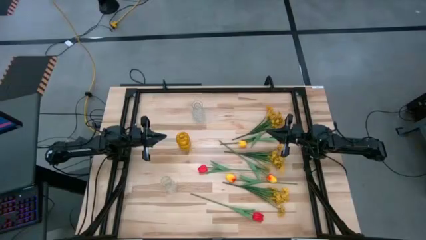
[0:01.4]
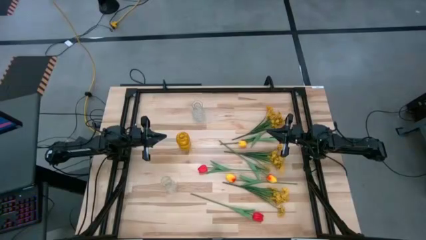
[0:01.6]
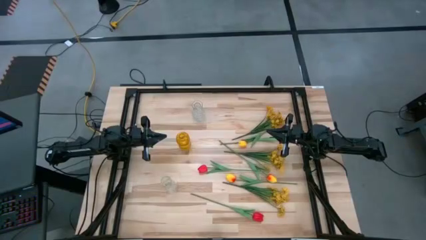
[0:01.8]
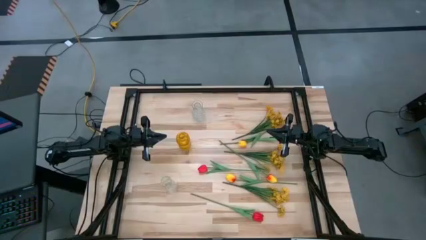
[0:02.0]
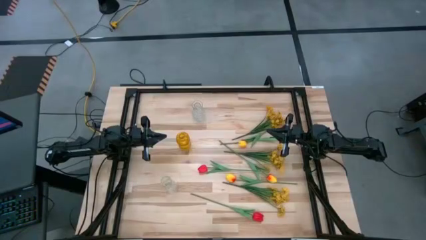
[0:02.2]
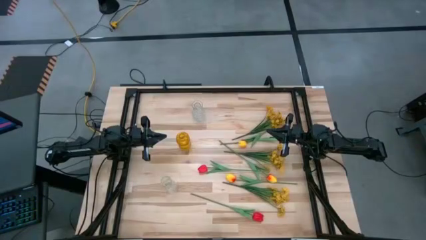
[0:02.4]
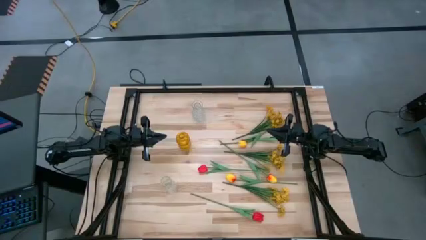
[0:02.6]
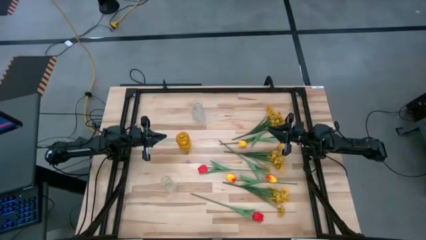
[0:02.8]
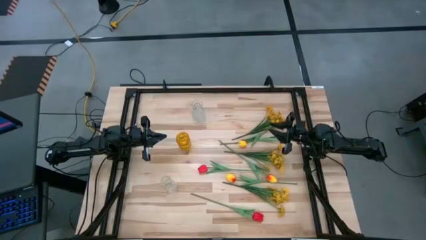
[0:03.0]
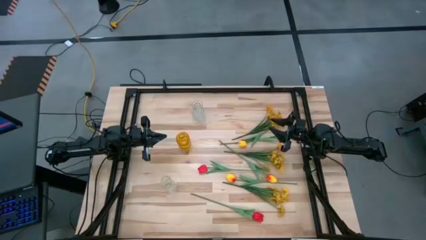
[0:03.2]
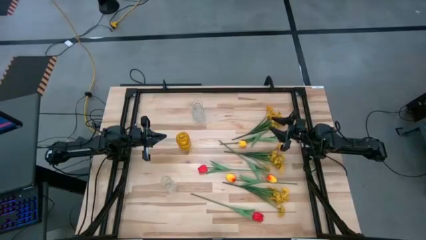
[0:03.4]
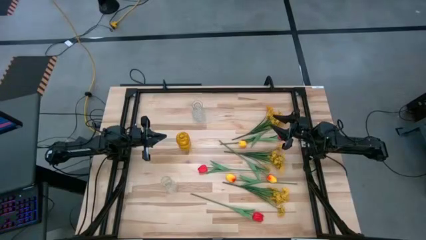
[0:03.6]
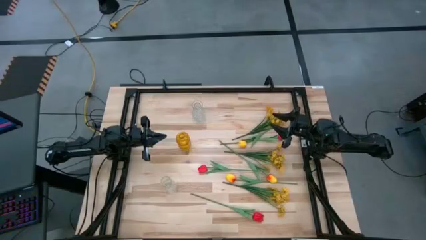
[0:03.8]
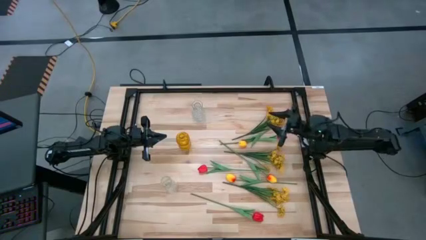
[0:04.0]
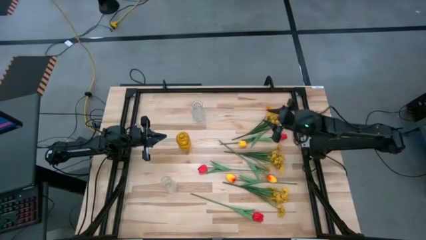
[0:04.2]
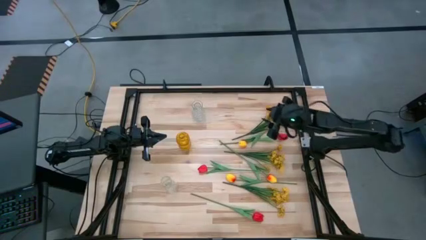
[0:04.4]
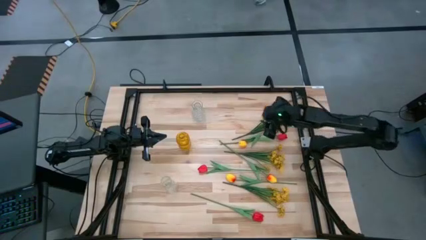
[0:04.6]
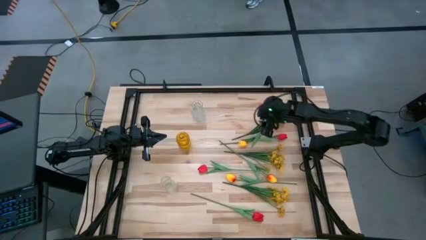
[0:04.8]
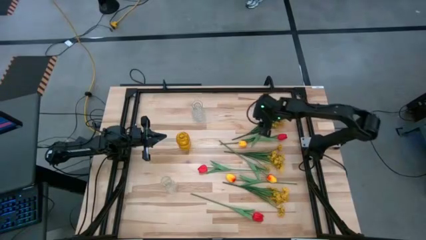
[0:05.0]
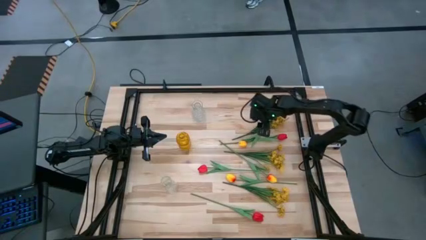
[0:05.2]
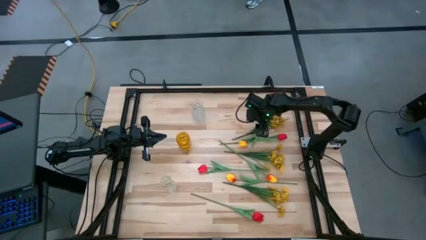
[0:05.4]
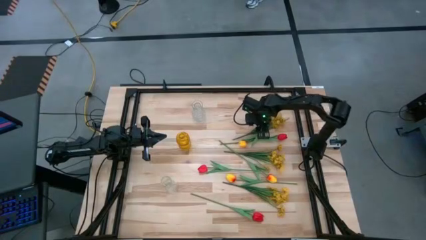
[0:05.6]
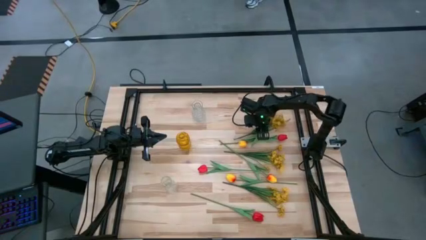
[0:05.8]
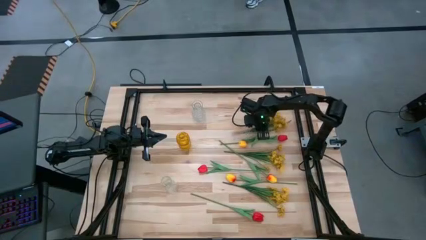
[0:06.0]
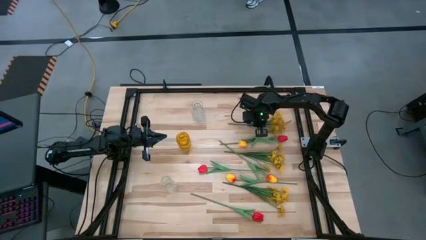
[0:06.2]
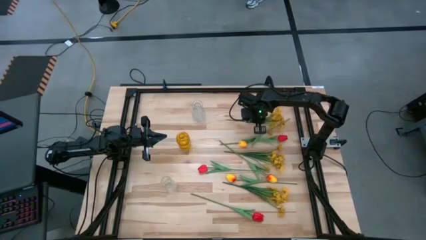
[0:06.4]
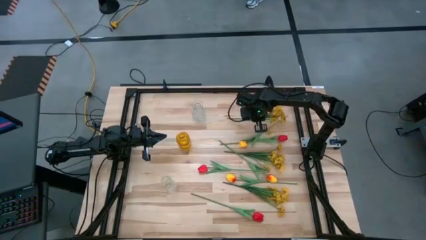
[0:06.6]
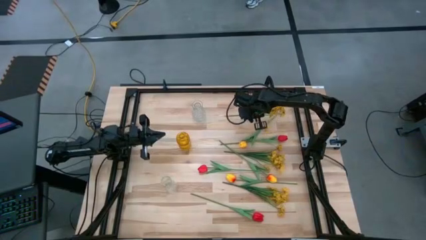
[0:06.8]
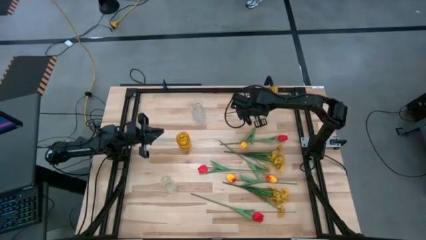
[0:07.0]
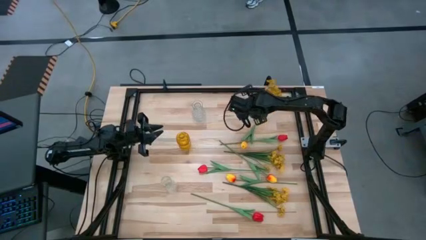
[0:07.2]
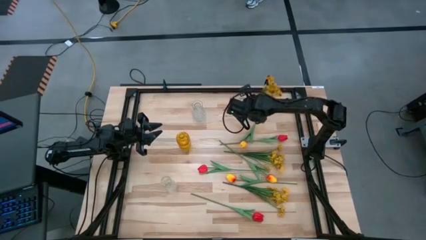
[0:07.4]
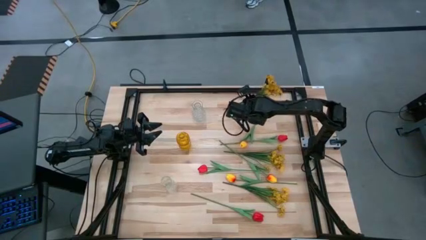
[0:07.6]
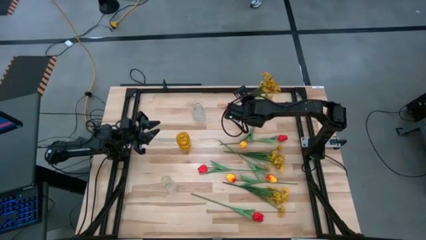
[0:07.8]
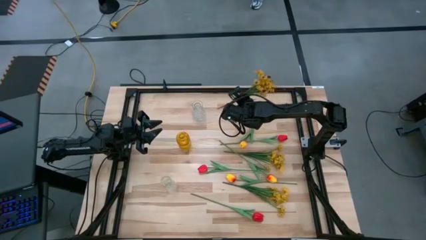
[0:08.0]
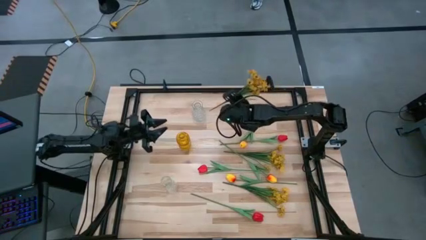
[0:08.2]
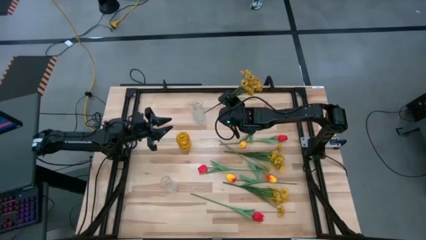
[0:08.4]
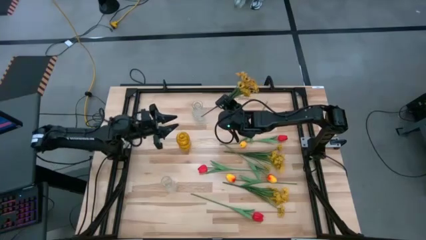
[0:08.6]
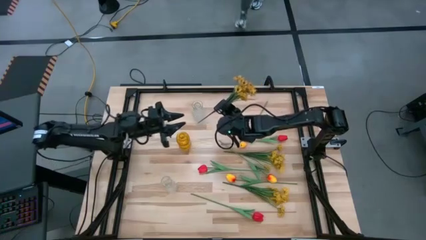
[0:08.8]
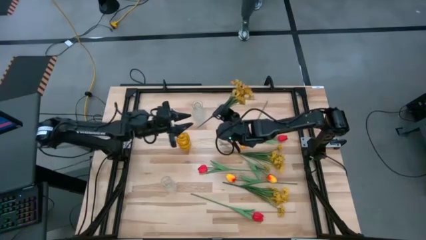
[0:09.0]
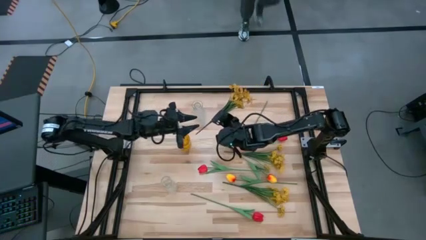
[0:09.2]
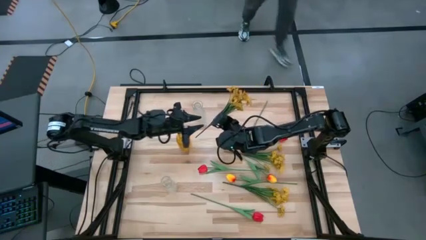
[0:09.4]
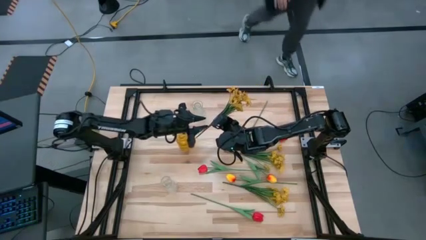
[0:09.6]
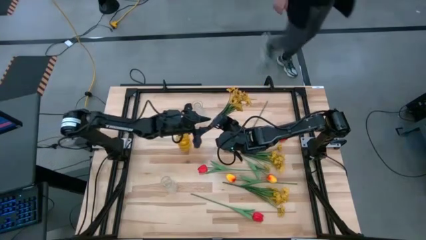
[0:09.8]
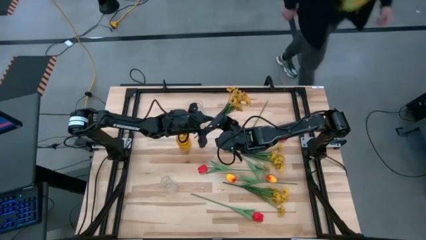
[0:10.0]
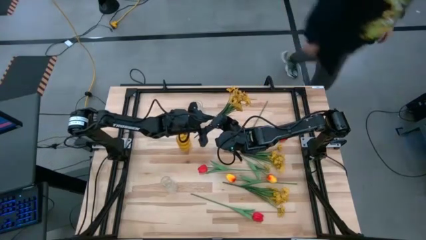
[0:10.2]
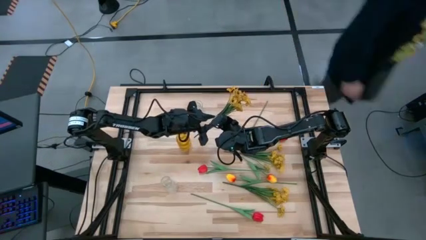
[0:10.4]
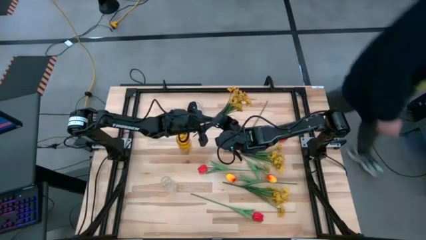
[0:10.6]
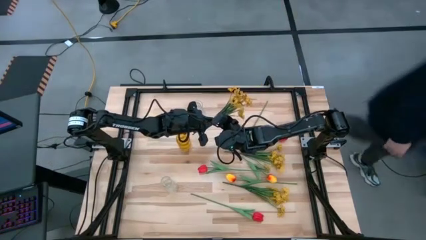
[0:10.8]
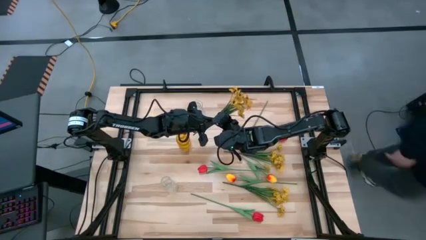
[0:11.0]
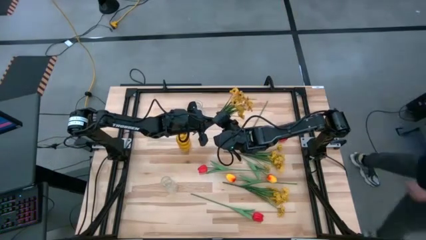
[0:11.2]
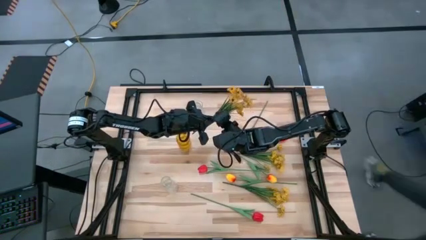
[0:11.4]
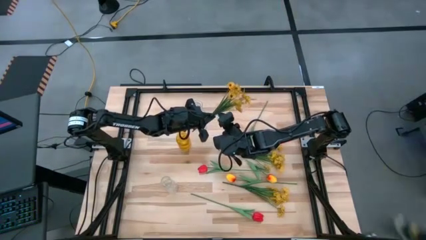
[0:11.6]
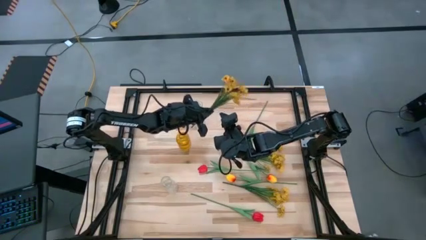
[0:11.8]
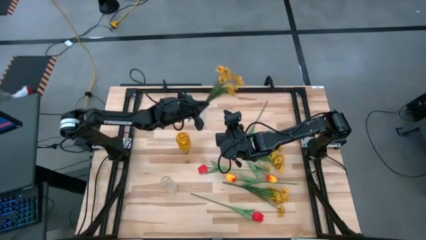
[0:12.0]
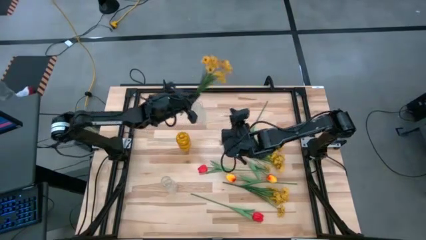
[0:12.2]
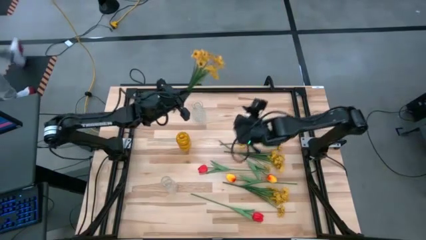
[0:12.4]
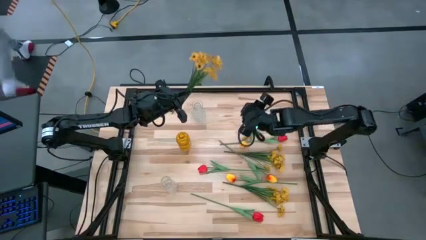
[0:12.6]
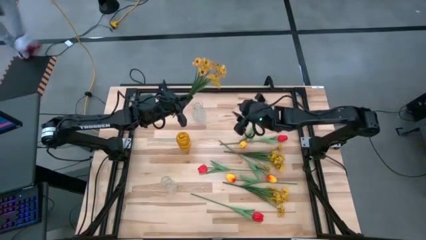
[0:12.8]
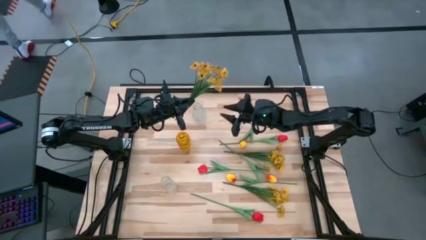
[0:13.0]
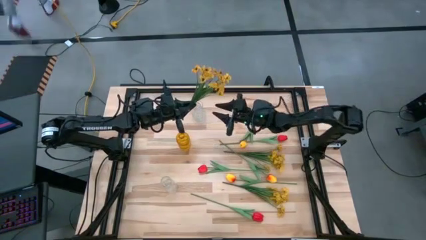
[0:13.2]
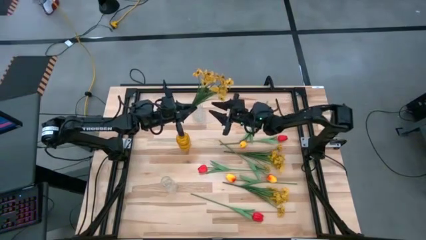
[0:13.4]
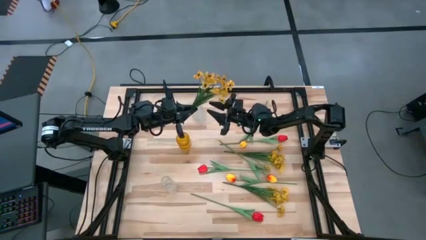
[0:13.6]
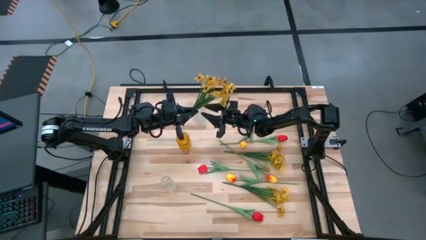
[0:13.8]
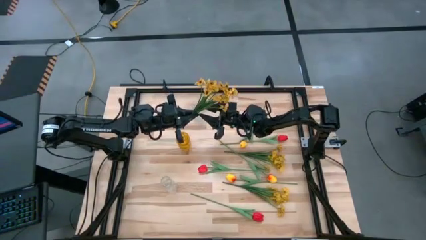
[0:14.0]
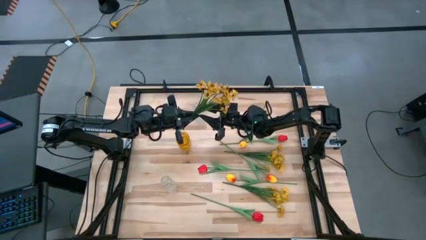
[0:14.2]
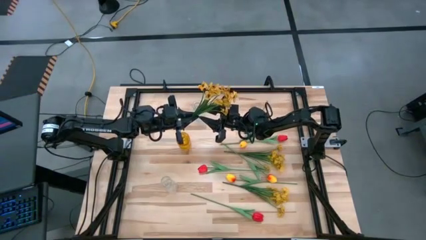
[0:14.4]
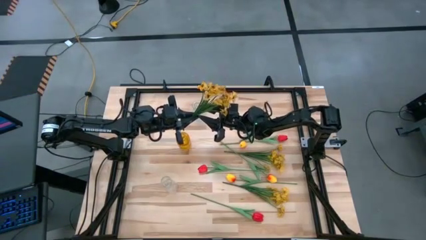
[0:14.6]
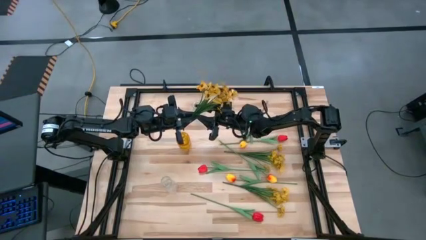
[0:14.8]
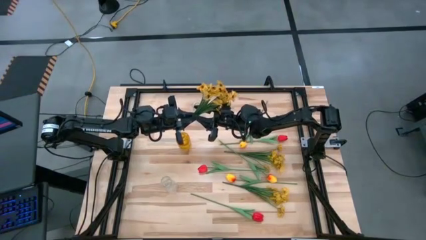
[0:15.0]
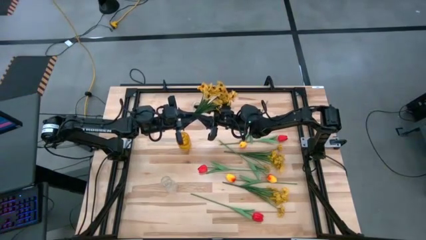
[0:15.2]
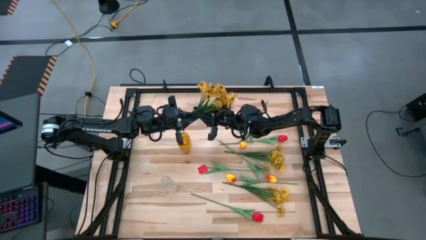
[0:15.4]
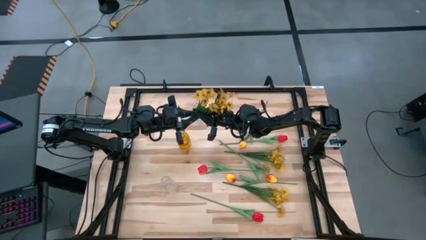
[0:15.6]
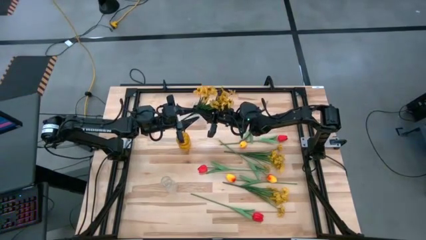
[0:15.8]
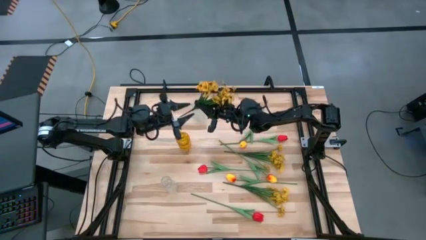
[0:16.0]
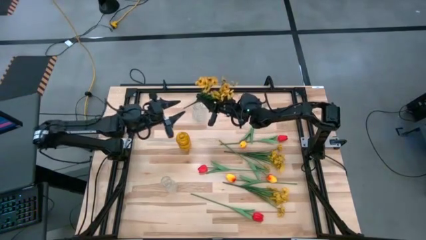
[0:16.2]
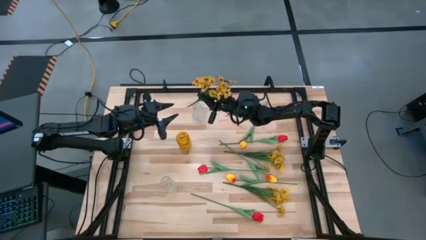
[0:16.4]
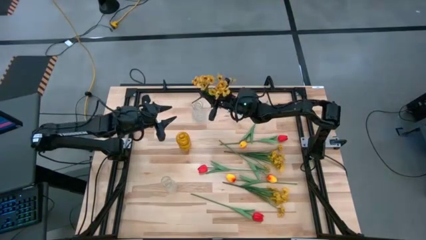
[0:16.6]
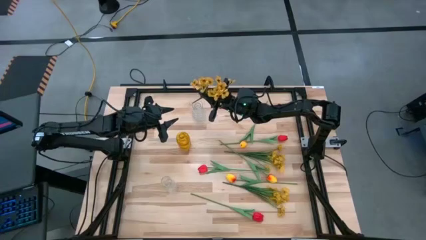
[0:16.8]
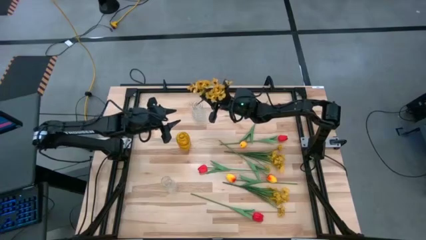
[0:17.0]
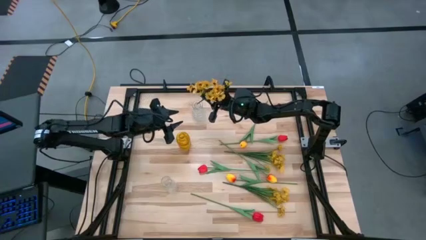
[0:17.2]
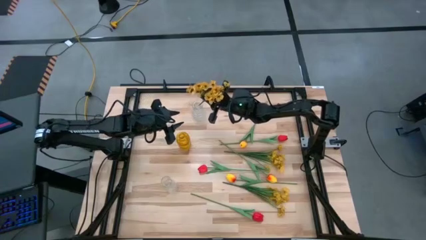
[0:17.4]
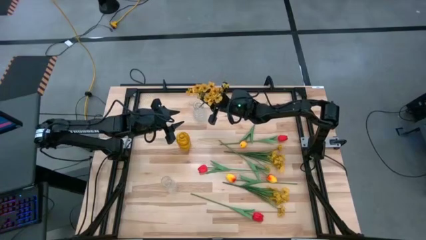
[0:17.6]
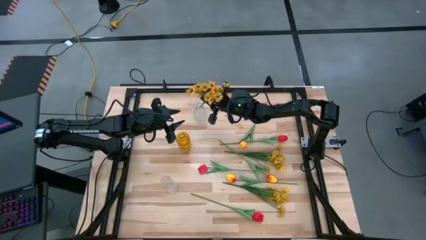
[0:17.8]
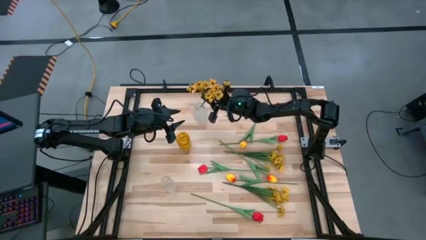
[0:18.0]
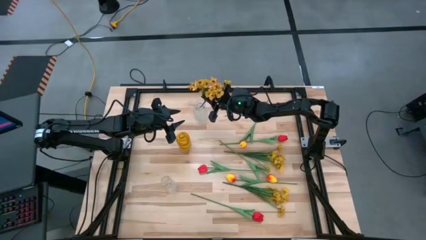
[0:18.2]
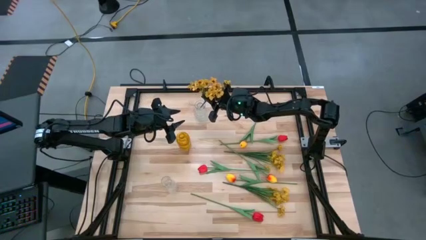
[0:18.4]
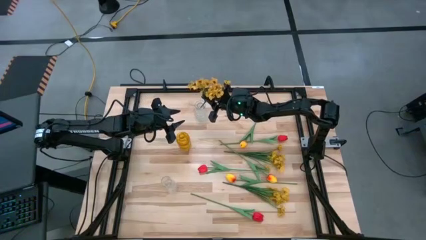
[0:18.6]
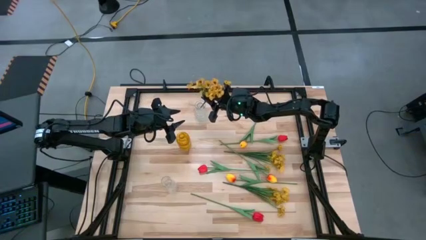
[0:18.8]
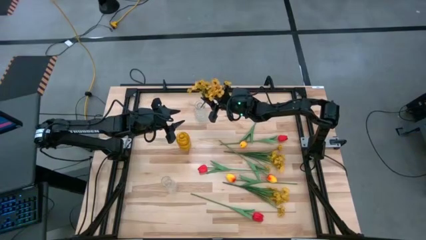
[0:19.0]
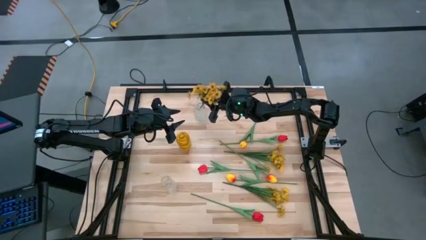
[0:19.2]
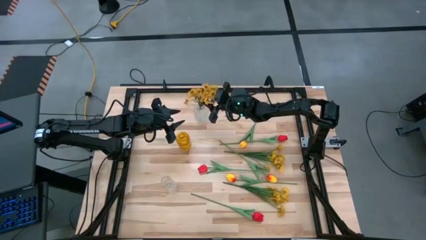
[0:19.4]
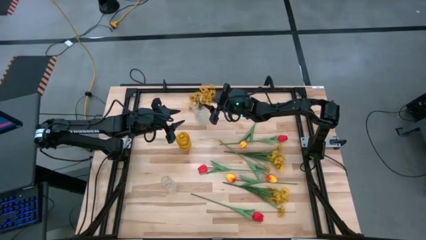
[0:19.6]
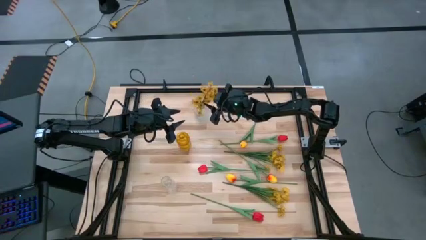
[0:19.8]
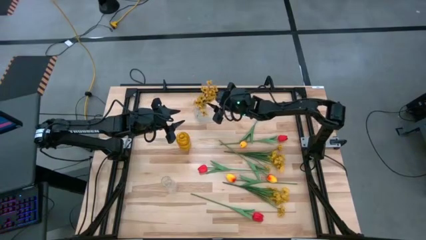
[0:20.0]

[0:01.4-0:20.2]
Task: Sort flowers into vase by color
Put the top yellow flowers into the top transparent vase
